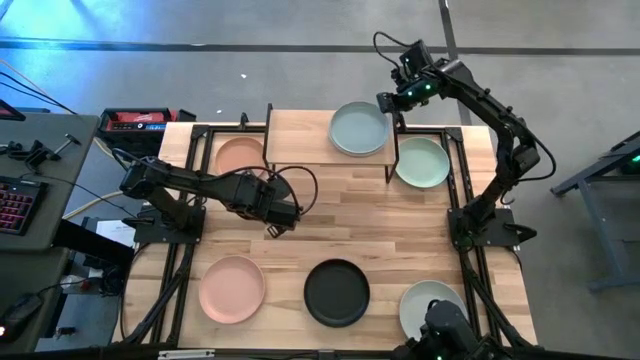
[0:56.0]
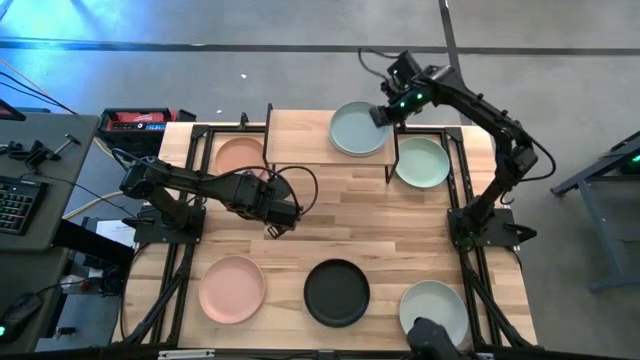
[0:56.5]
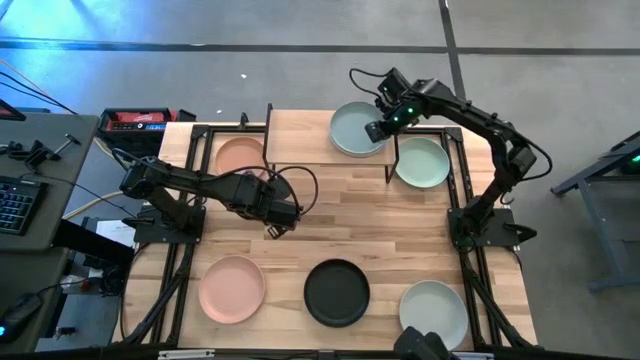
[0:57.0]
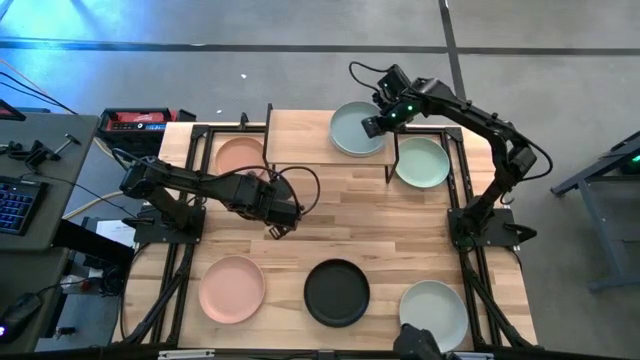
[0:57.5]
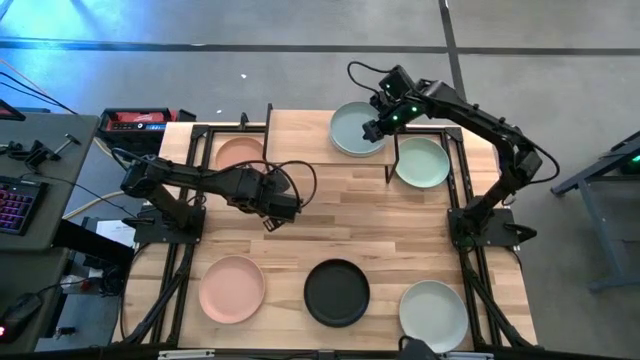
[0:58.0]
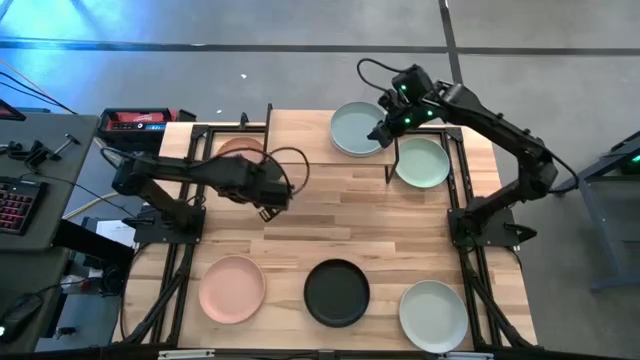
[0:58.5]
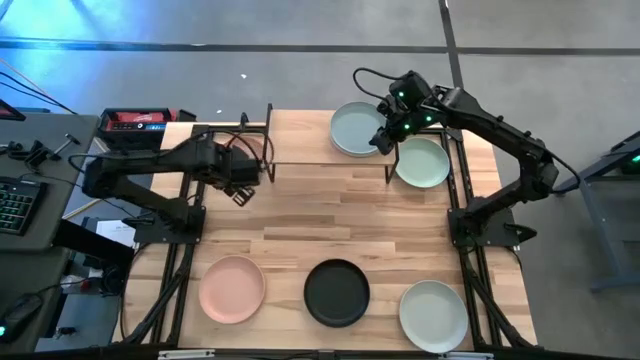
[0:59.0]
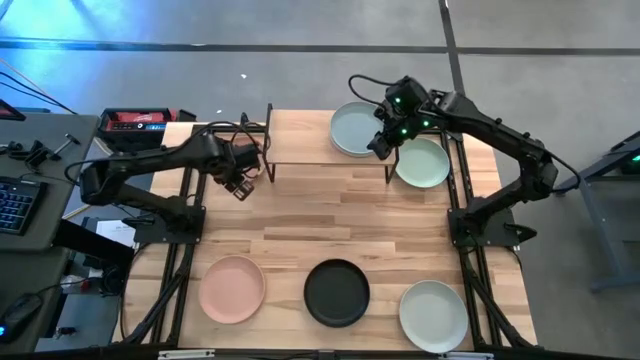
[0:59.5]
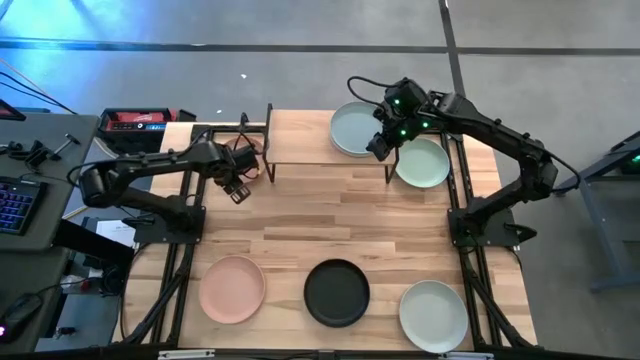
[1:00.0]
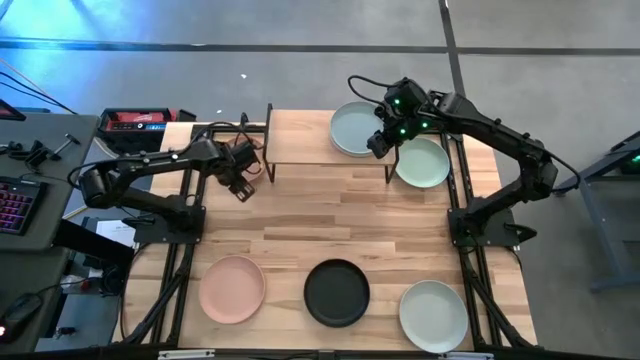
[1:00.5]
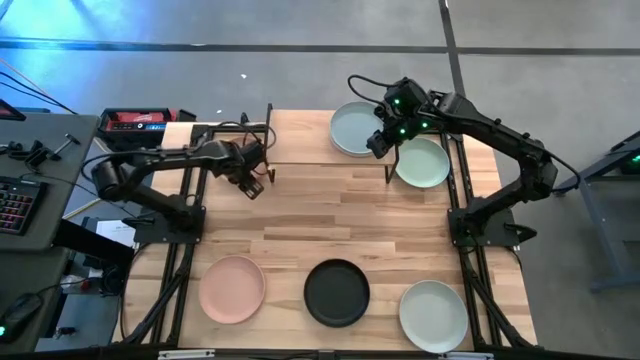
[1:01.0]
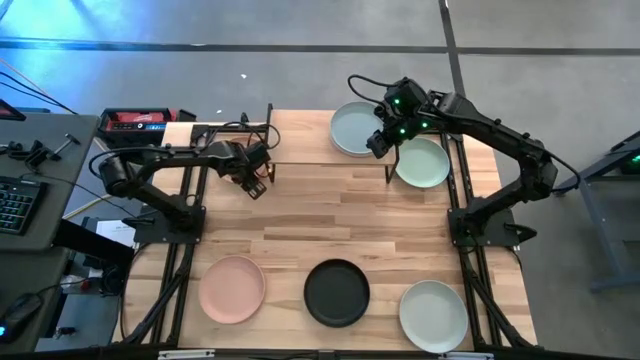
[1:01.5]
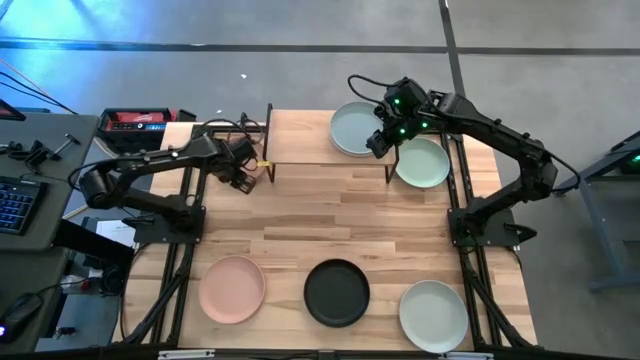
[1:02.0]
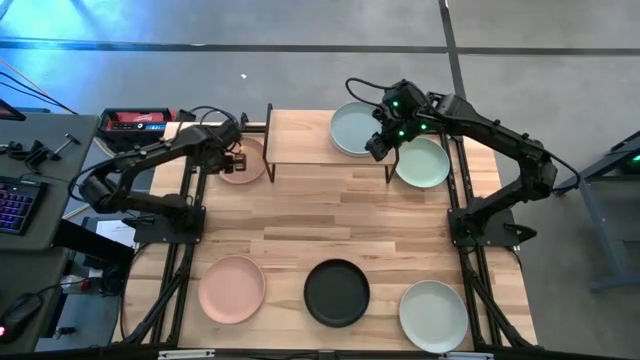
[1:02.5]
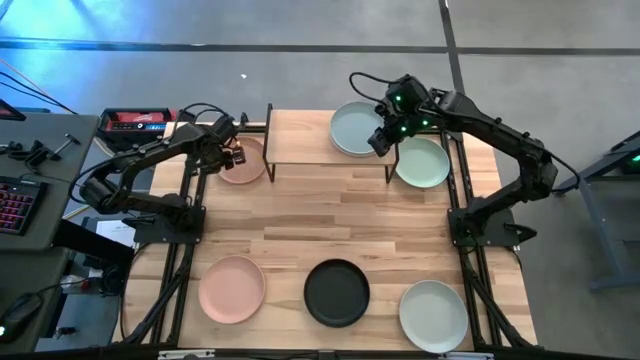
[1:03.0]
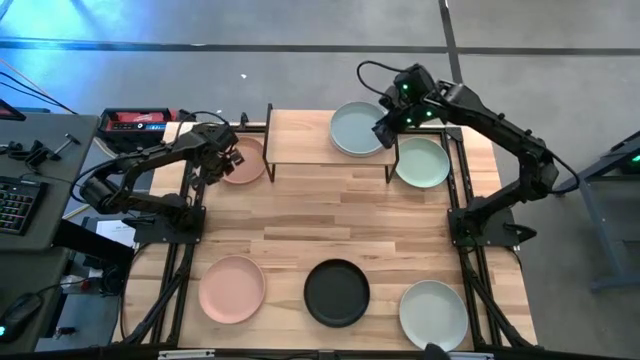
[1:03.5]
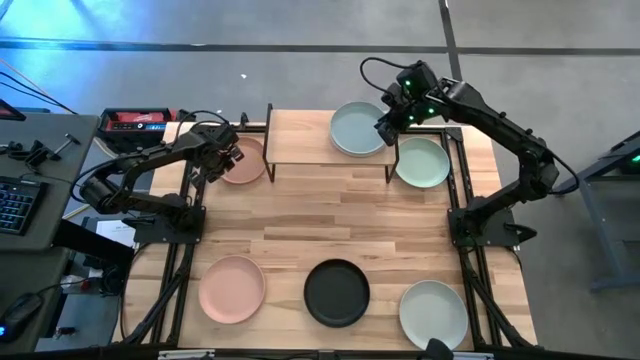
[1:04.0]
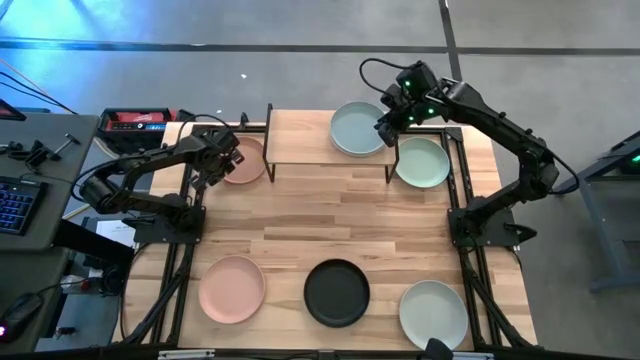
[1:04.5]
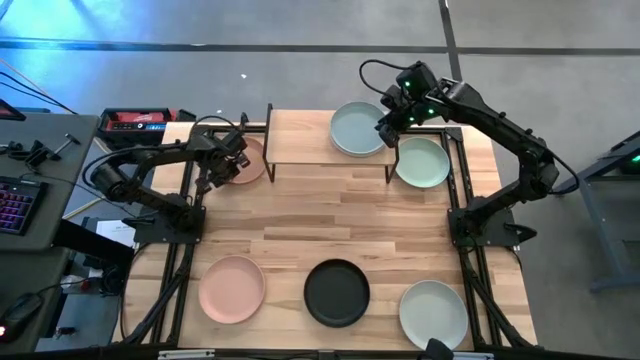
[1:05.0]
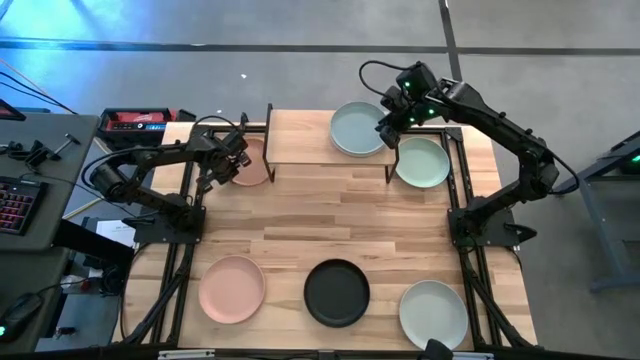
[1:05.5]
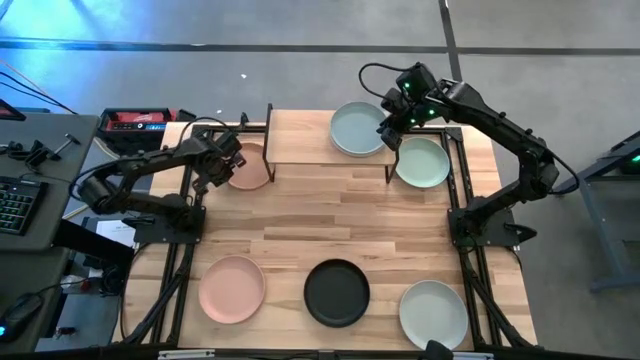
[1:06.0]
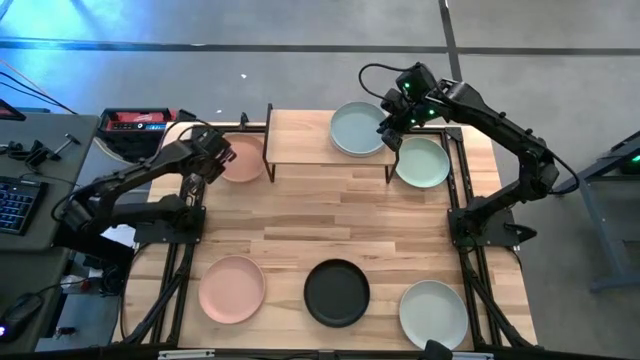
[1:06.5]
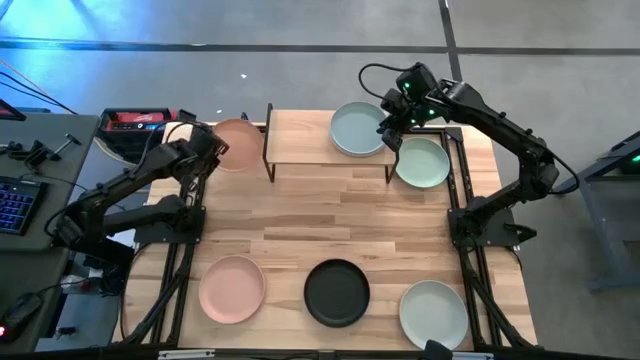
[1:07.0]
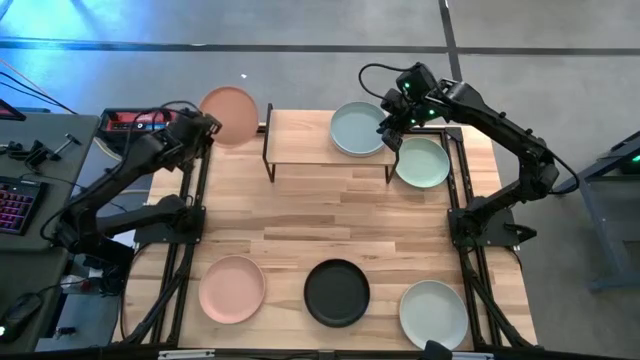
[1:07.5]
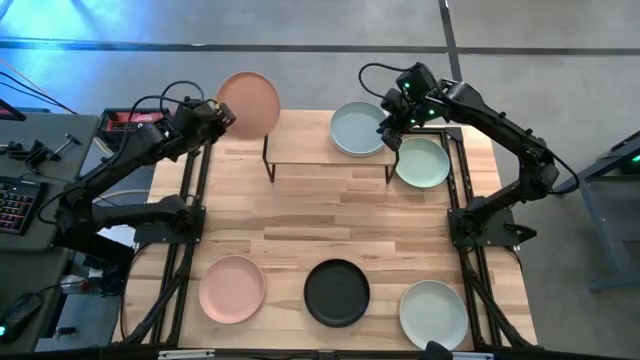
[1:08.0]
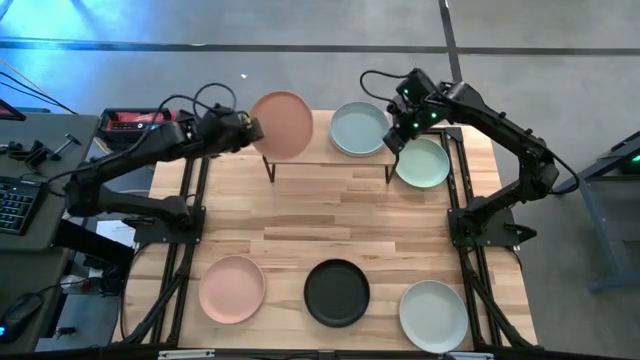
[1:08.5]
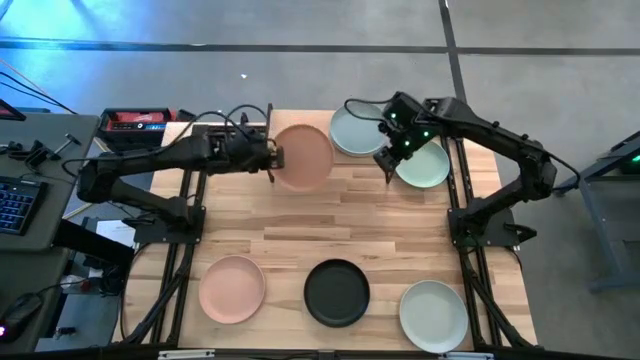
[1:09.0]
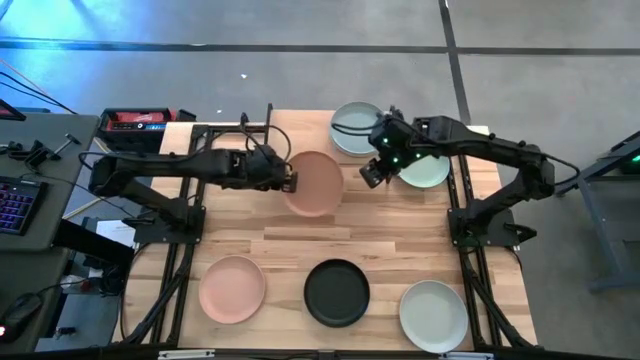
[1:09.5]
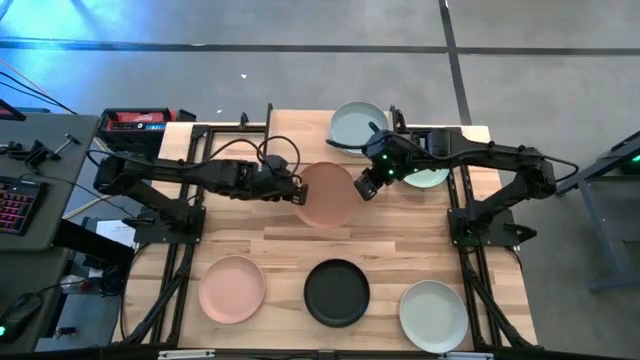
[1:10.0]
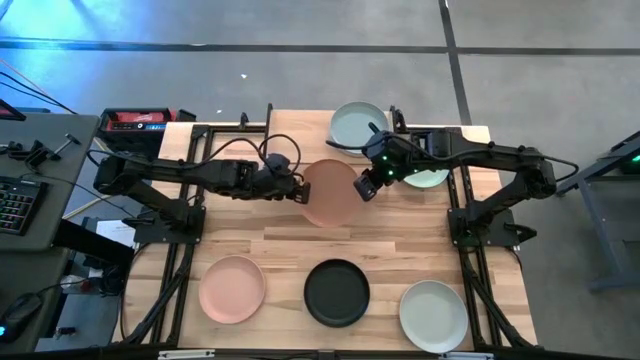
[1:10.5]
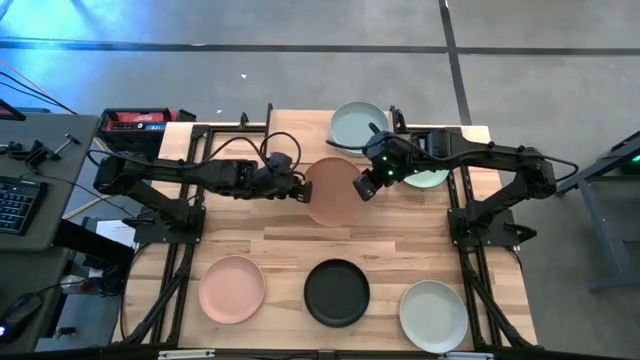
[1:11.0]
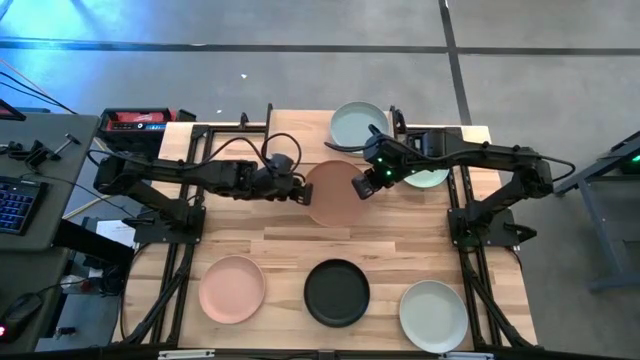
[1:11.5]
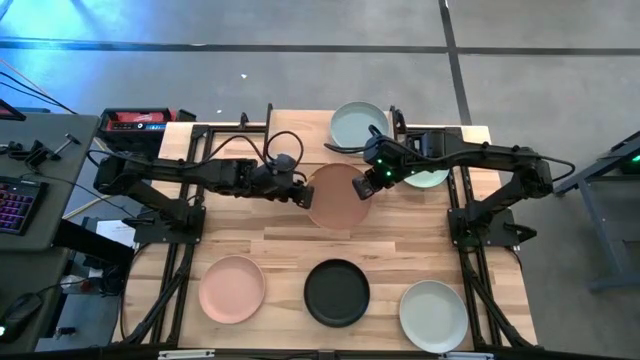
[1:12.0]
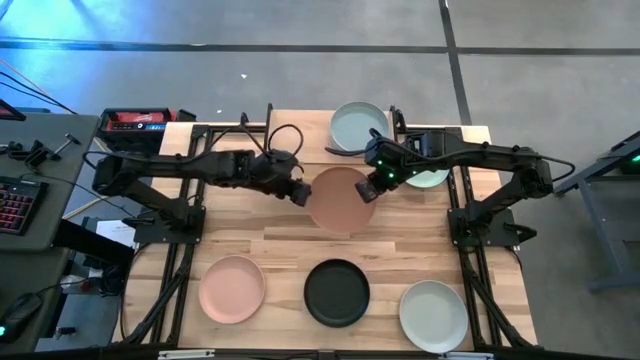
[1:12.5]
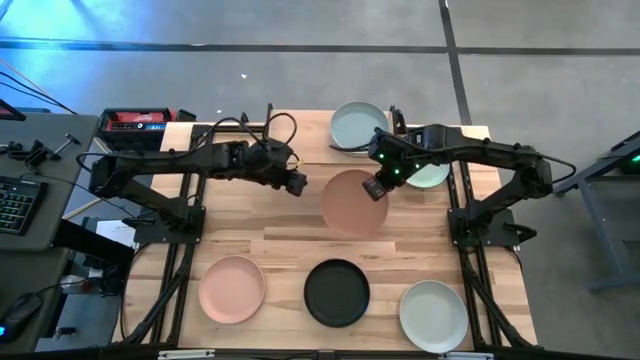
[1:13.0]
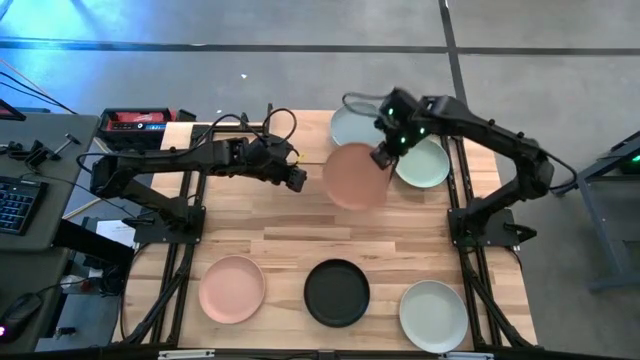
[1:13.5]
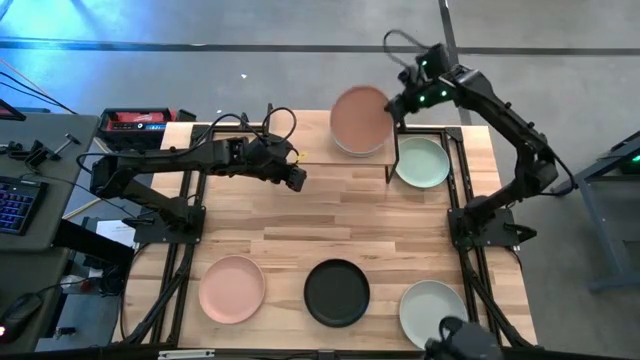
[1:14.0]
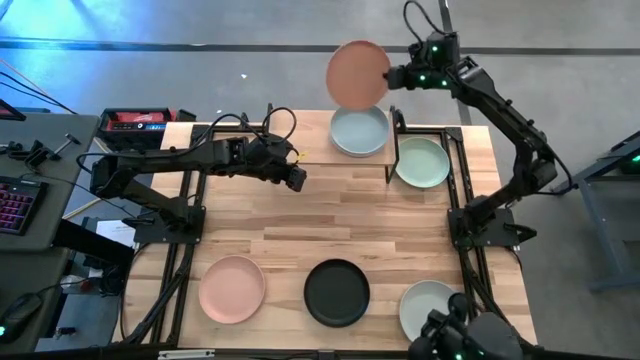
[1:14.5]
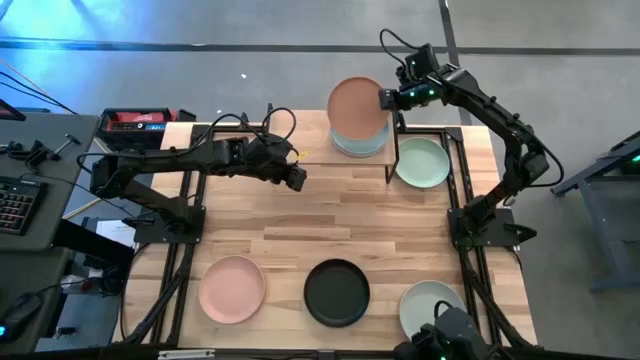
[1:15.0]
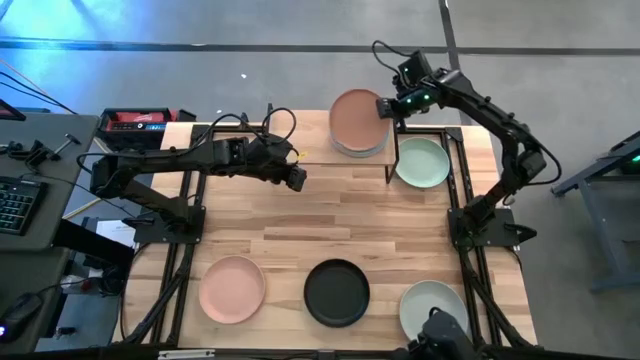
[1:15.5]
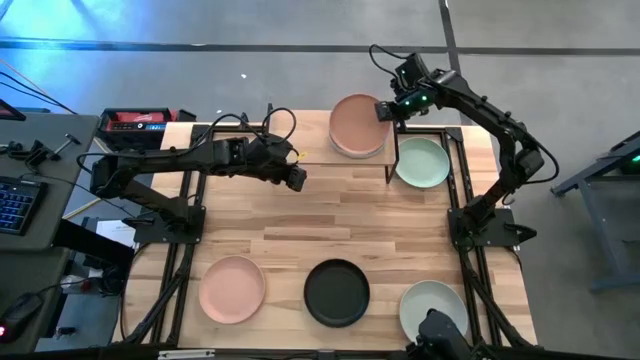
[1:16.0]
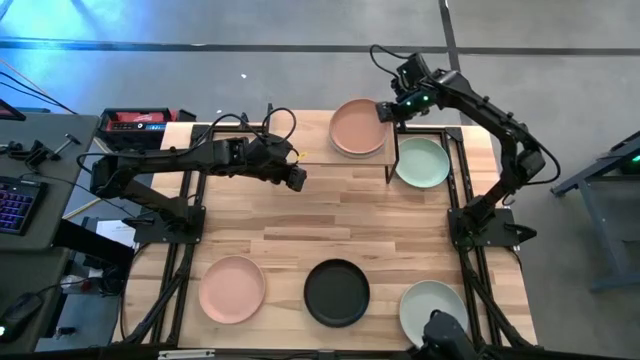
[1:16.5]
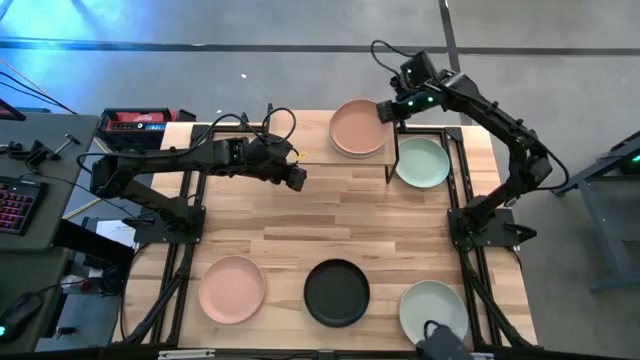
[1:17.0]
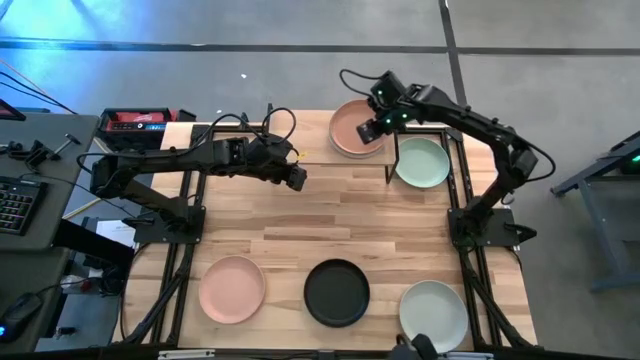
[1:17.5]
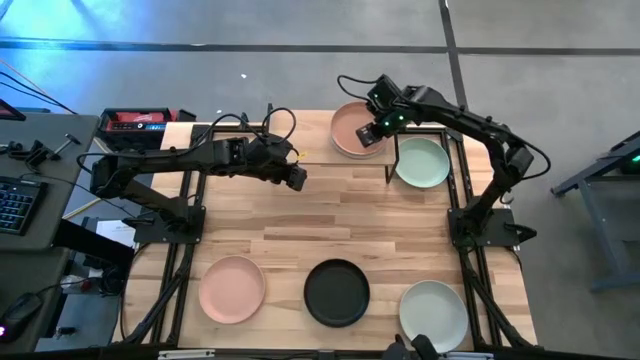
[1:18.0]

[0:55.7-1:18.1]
Task: Place and stack plates onto a shelf
Stack the light orange plate on top of the other blue plate on the shelf
